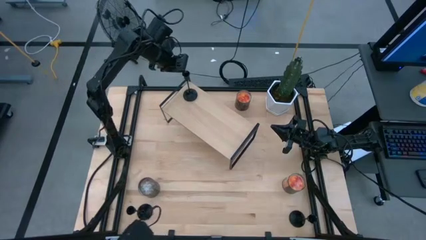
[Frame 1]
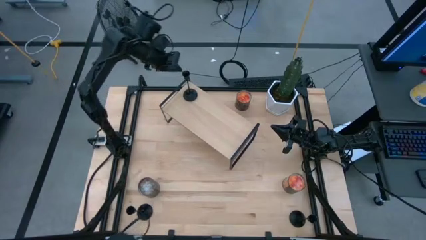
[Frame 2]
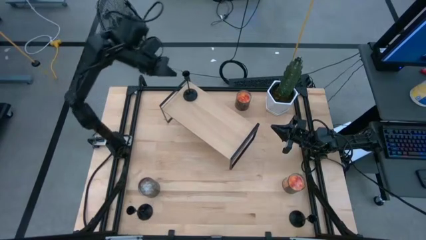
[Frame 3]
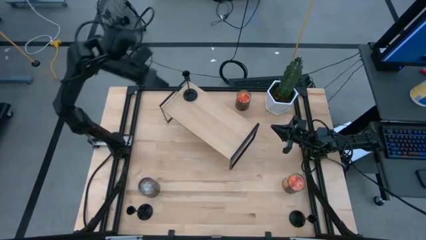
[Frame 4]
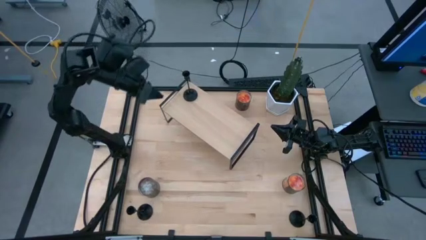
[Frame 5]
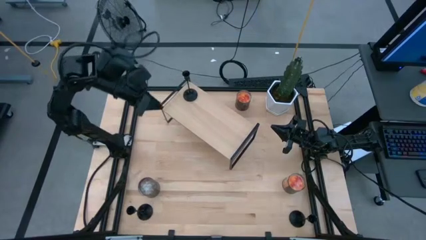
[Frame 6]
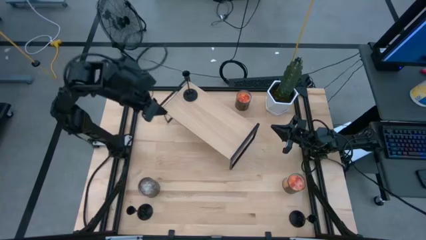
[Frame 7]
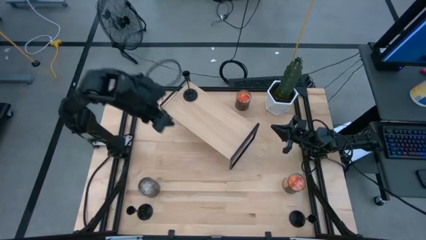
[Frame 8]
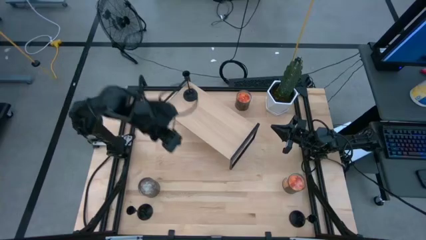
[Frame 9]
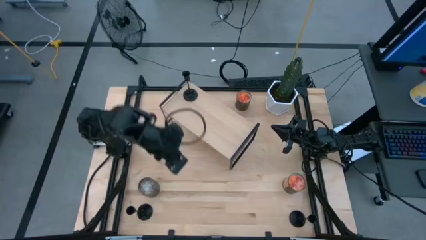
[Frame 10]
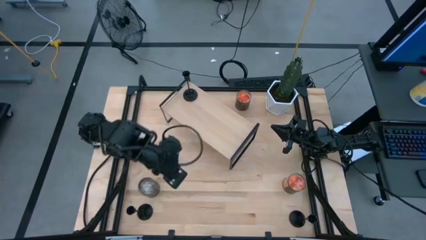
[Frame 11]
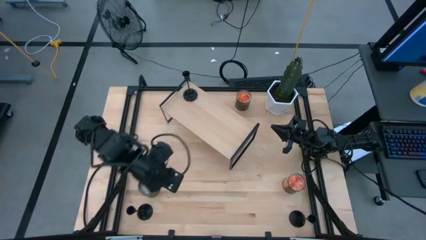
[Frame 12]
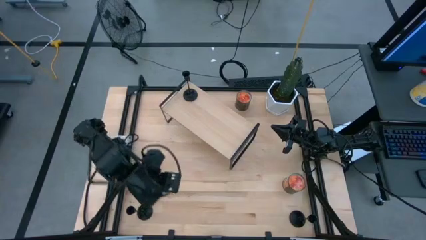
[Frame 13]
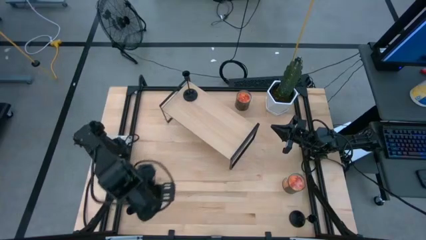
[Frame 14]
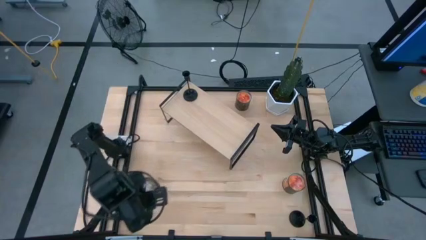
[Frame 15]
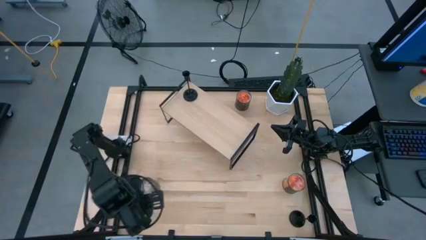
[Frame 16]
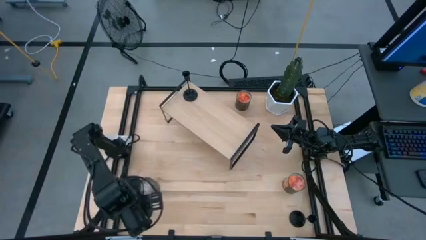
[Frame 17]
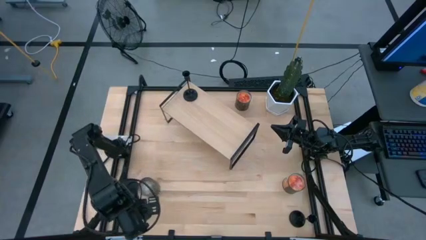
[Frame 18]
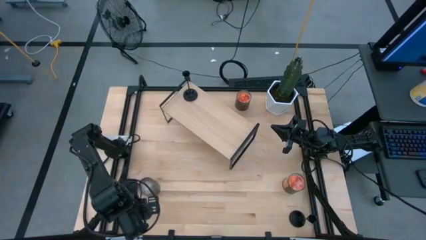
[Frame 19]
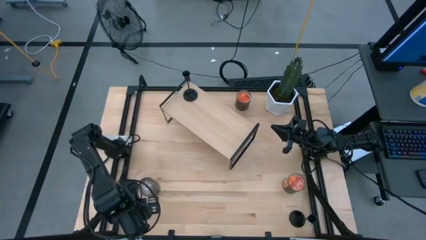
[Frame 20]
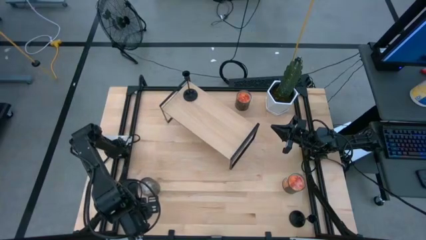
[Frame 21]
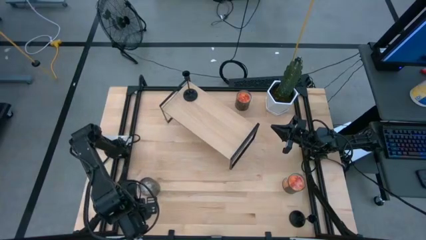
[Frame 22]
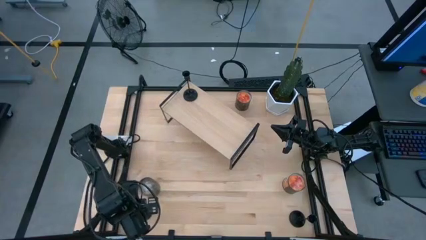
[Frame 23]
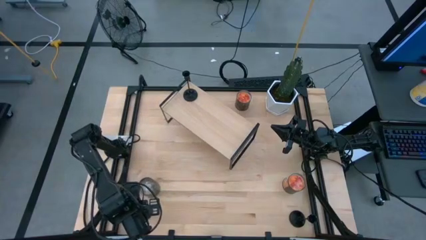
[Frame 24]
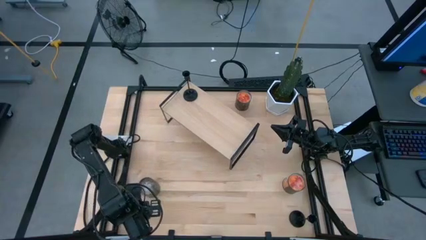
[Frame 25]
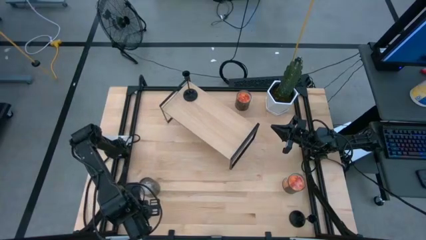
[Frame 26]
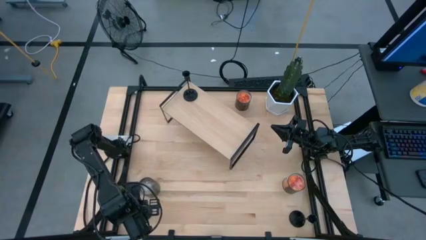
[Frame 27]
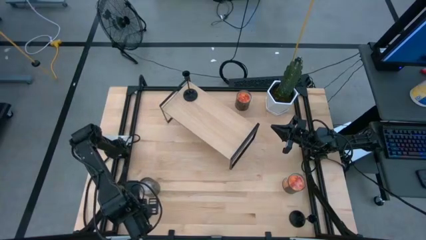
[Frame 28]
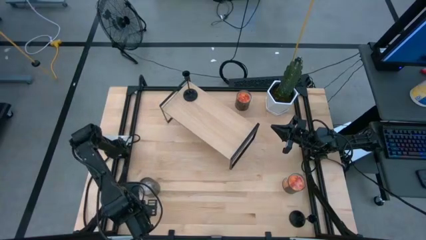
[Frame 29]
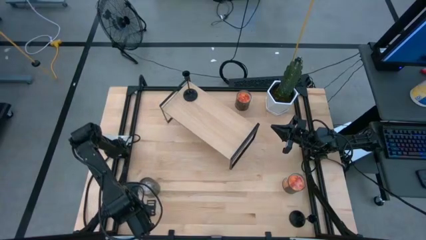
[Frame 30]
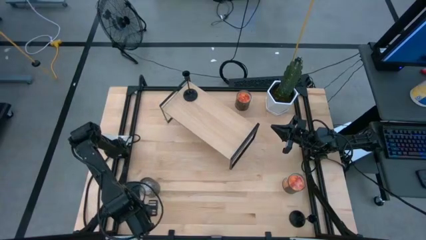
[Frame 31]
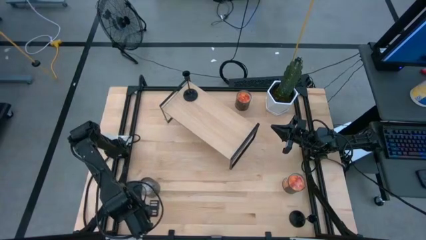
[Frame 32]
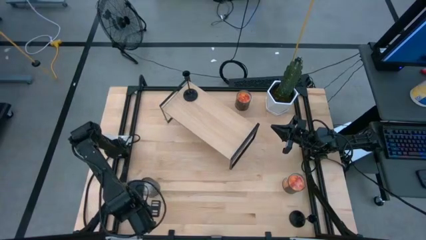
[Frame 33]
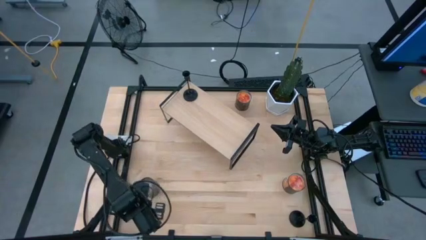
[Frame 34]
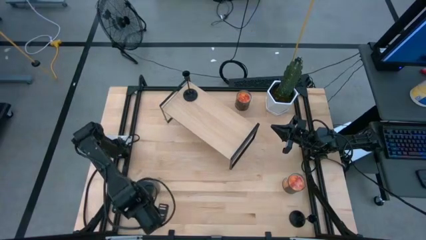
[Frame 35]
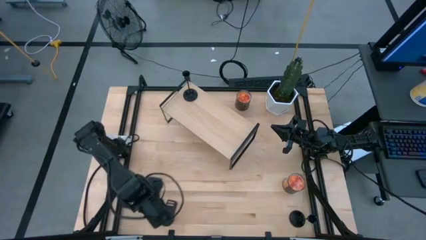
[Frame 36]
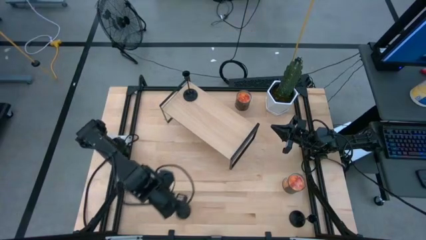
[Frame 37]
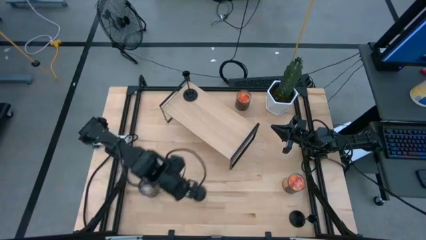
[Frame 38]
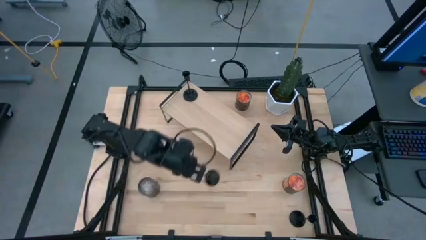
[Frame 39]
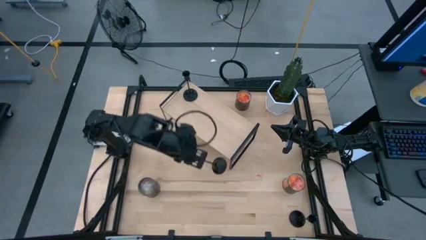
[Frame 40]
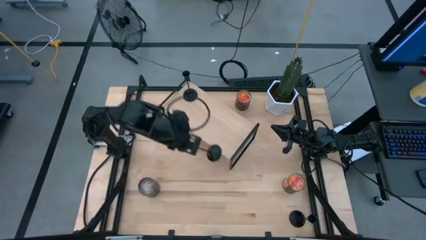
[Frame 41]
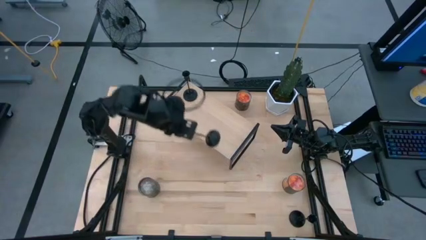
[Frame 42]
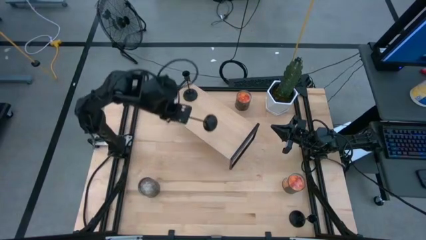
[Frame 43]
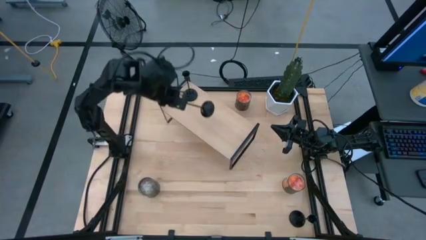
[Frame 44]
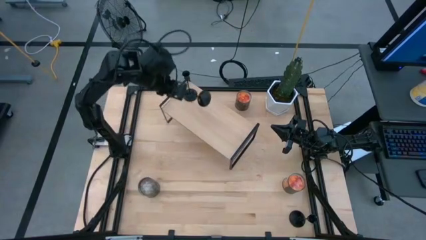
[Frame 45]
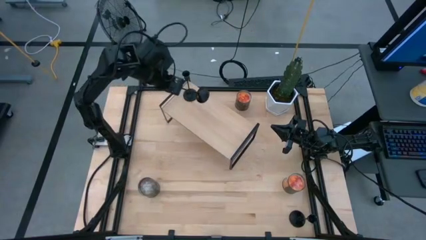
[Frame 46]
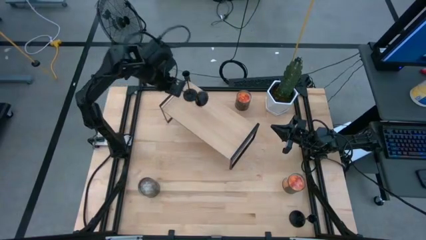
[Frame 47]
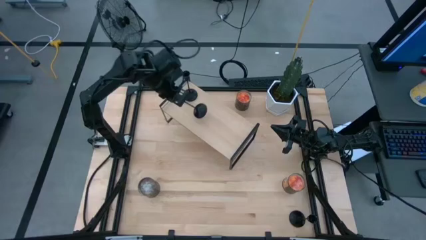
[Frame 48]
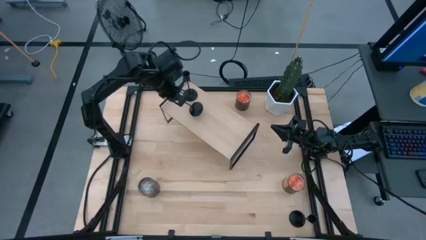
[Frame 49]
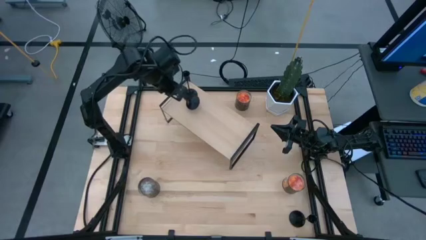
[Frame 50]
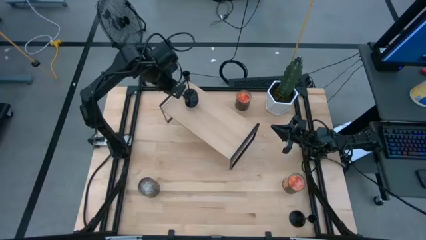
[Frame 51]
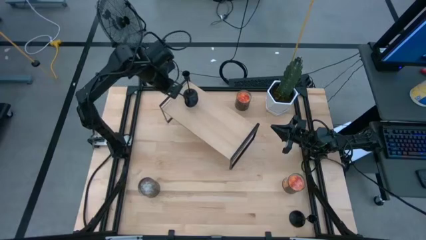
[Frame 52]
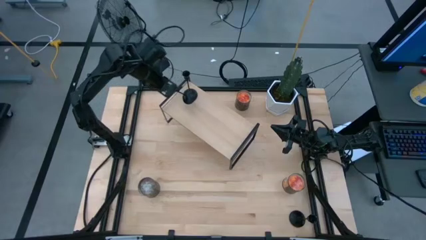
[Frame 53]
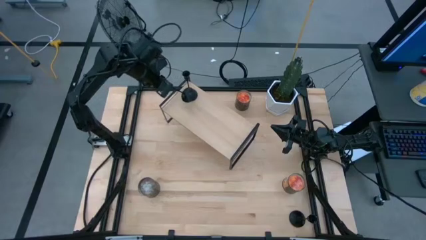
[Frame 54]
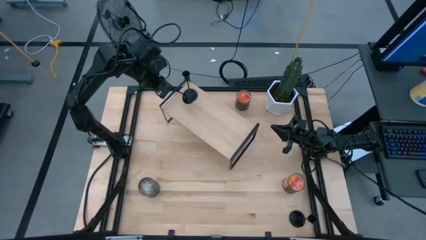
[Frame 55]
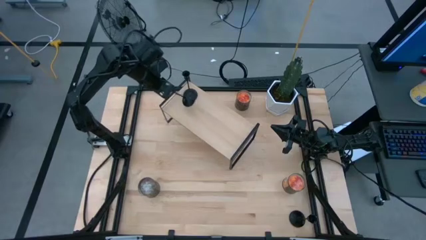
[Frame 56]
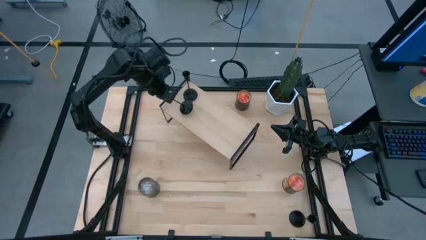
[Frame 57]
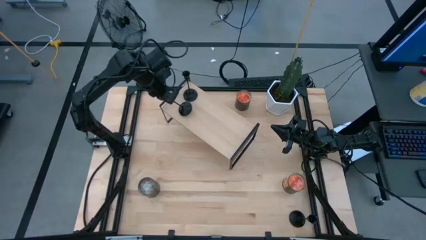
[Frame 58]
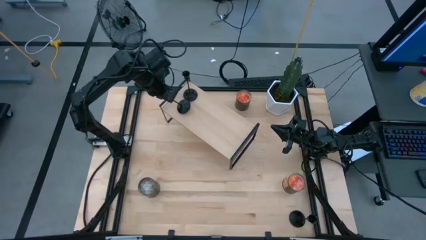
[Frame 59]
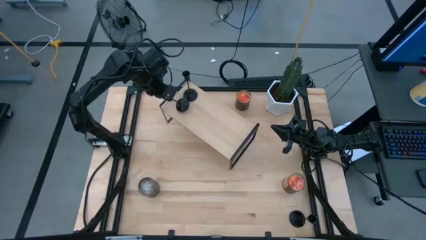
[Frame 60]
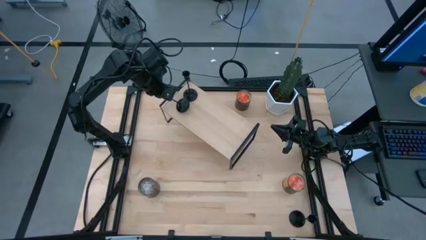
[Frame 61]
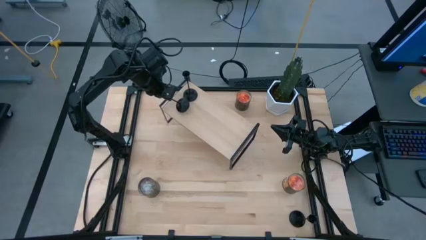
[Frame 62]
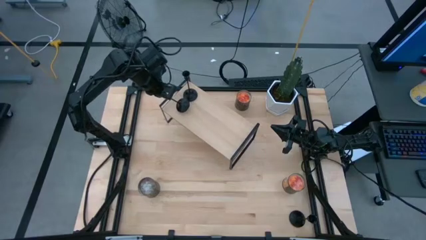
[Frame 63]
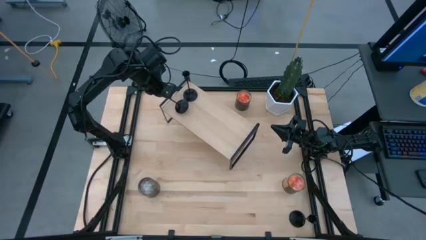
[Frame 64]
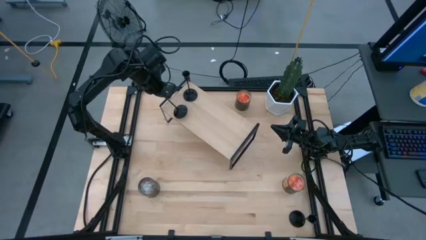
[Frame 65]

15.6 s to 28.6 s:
Task: Pick & Place candle stick holders
Put the left black candle holder on the shelf

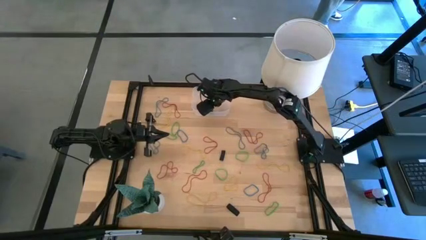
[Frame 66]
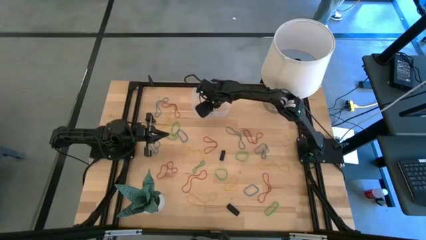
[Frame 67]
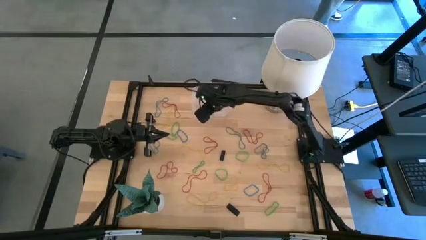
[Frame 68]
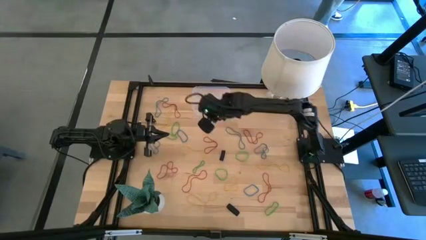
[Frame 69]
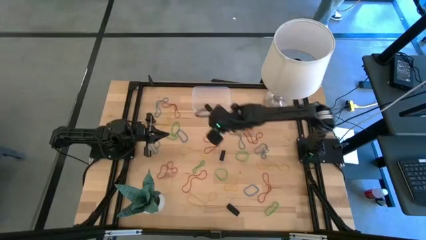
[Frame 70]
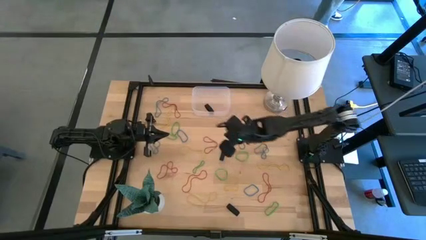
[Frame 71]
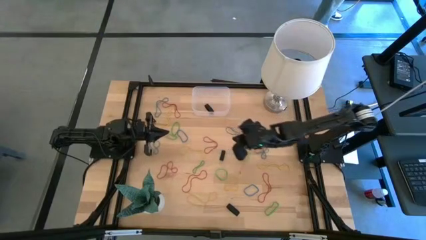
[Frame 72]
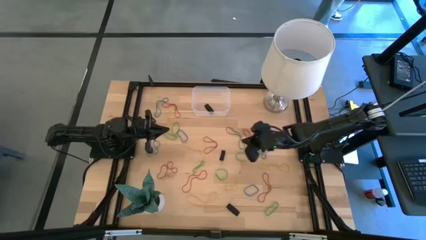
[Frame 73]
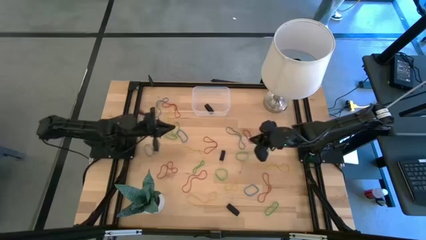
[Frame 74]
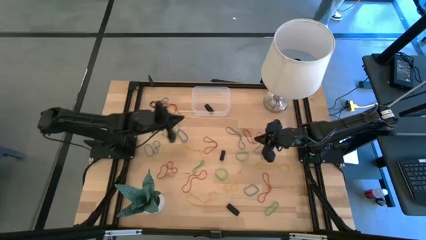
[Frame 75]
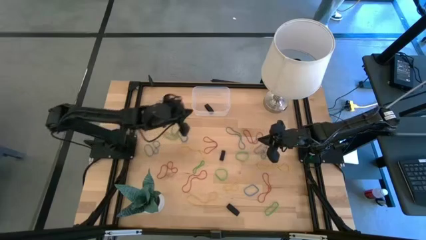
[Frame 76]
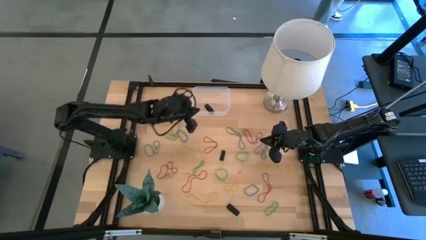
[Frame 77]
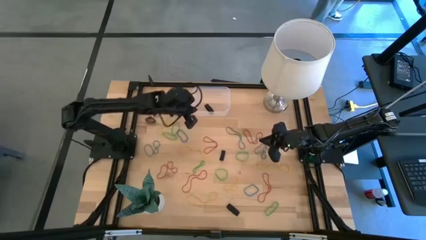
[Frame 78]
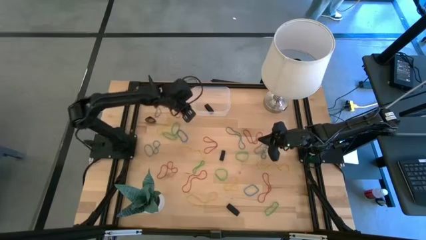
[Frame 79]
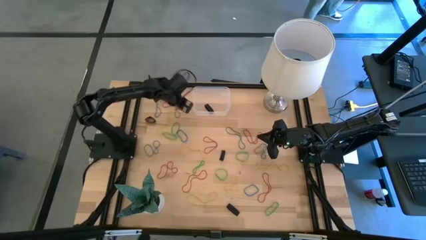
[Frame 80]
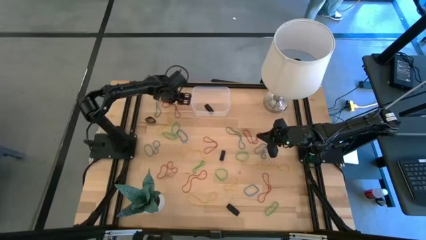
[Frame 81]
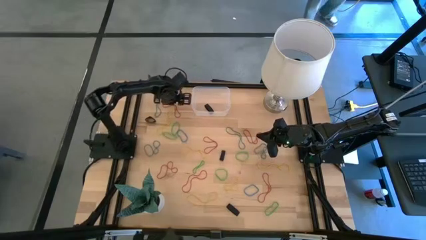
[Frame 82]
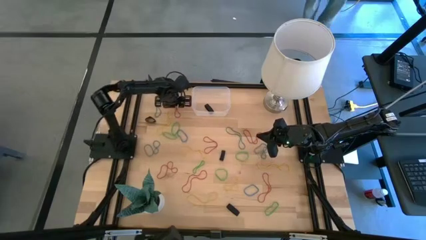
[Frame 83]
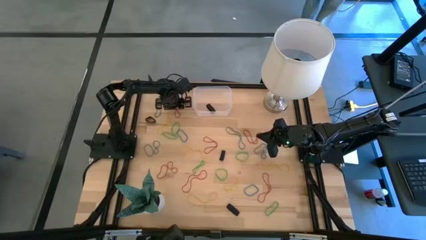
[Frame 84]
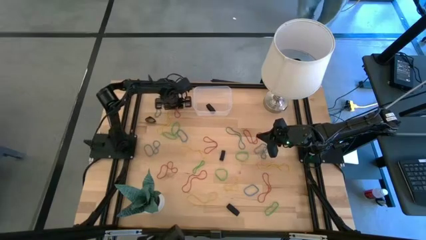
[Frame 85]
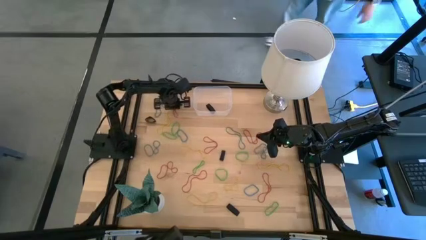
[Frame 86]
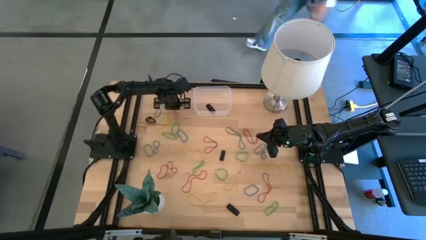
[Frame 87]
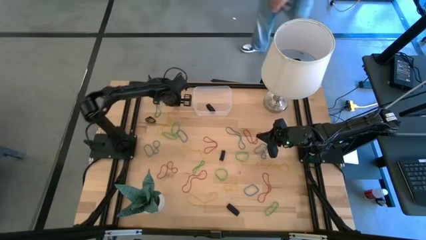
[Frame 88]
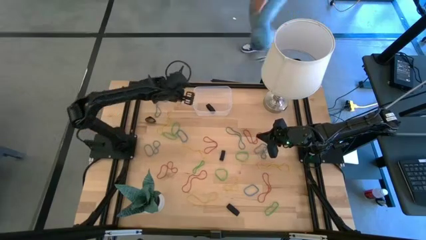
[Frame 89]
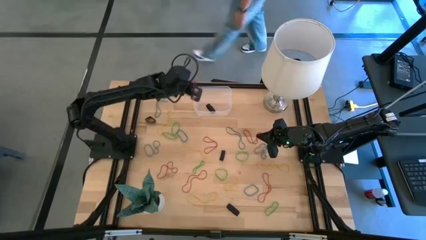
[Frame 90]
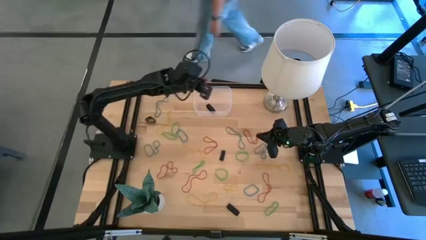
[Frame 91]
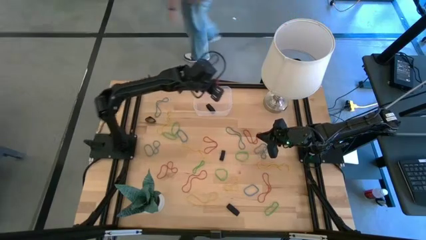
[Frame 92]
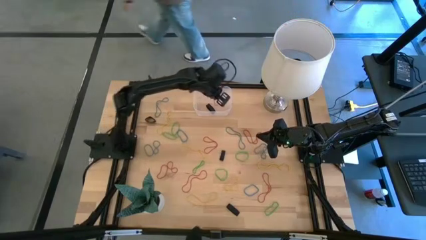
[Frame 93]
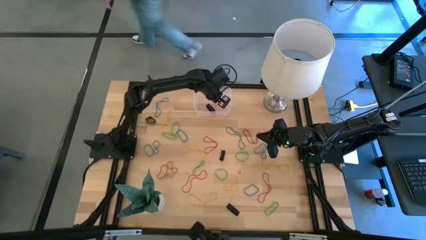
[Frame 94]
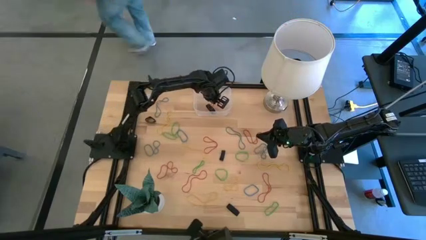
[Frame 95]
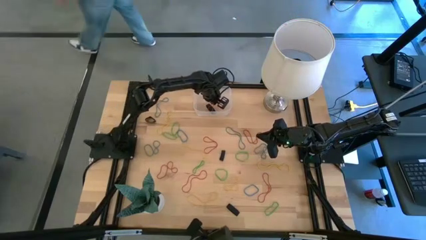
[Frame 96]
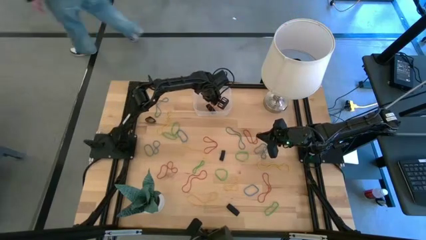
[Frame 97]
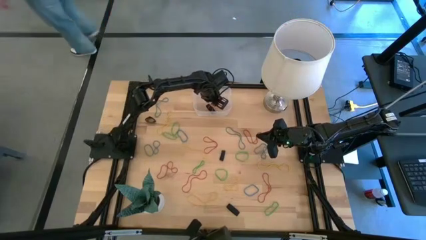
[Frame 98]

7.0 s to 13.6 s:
Task: Pick and place rubber bands into bin
Put the red rubber band into the transparent bin
